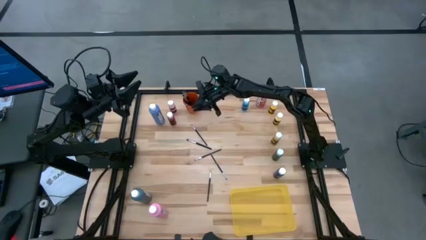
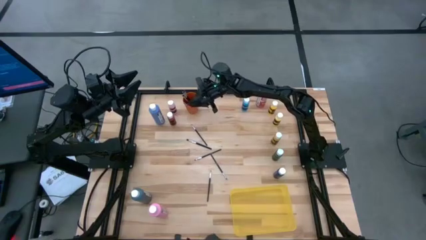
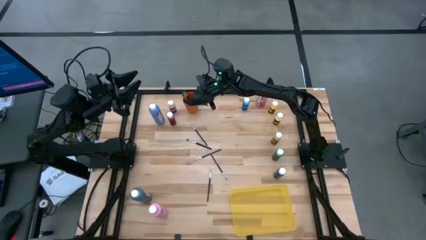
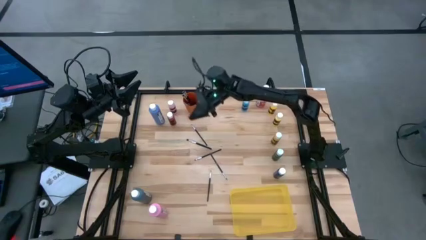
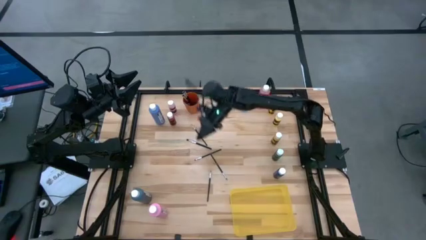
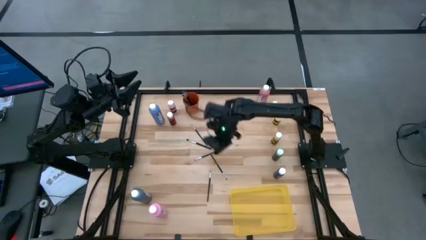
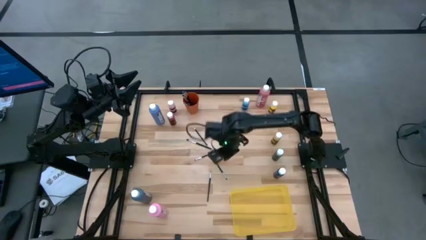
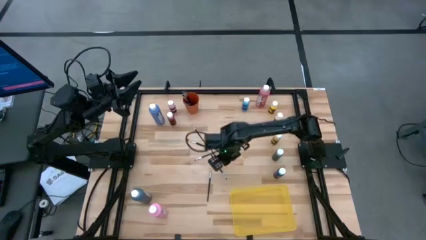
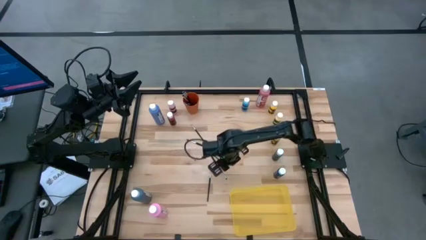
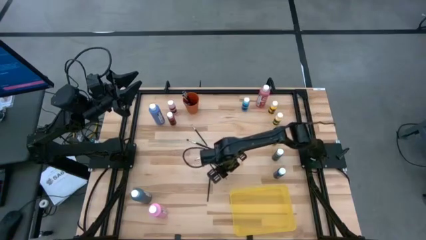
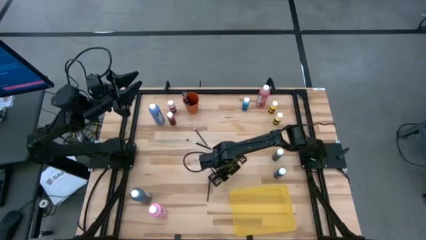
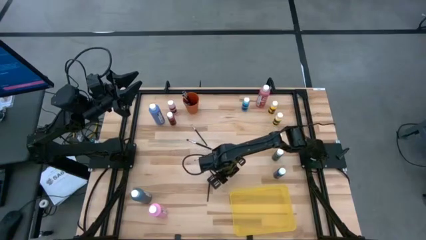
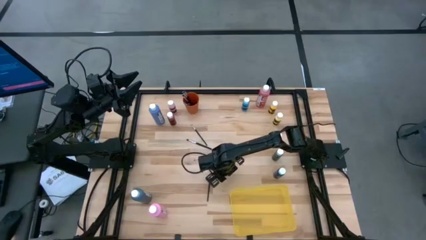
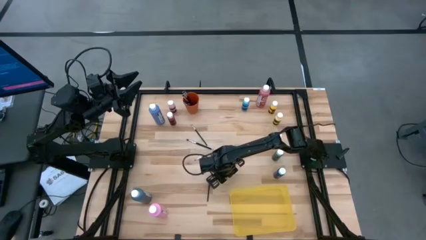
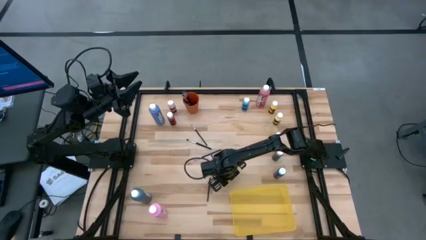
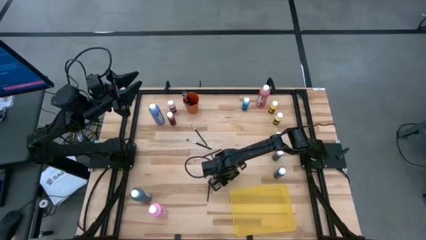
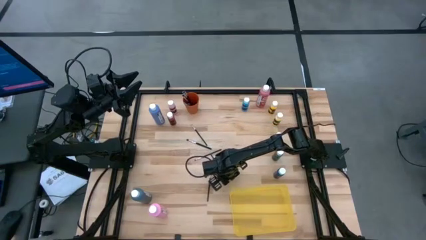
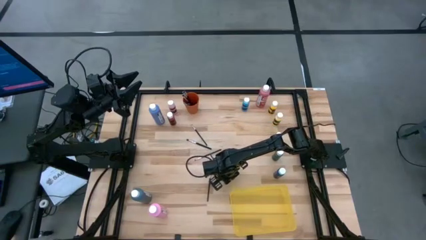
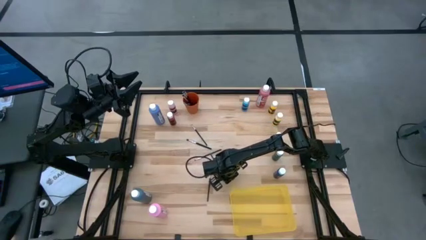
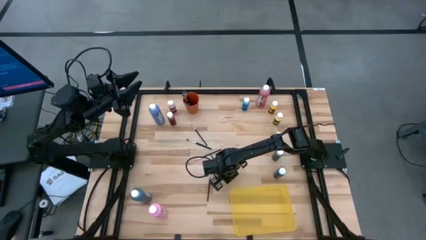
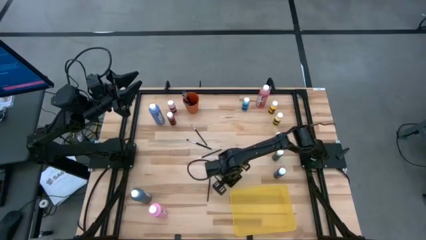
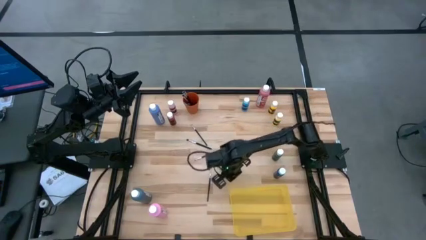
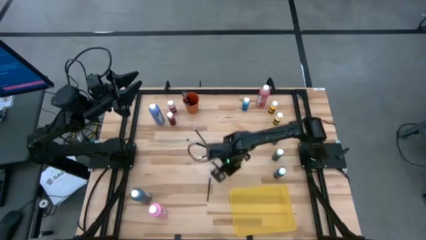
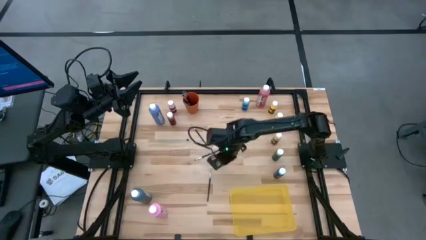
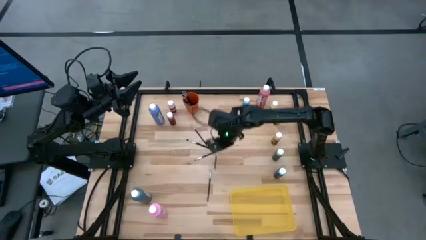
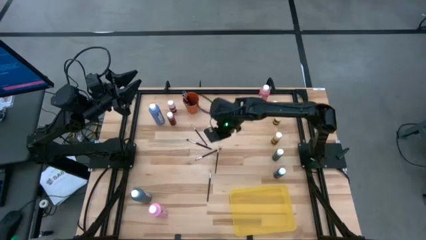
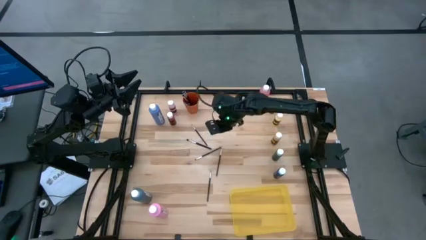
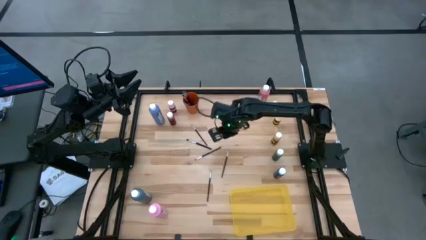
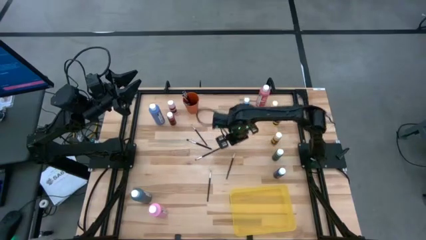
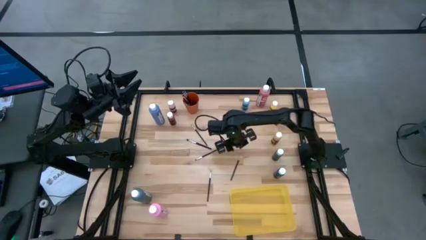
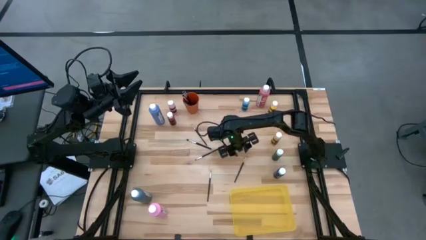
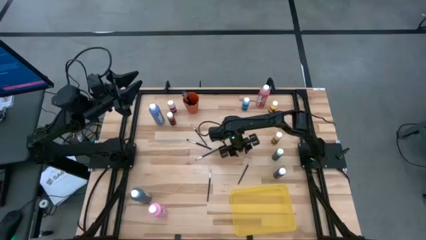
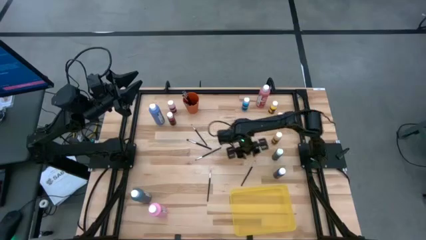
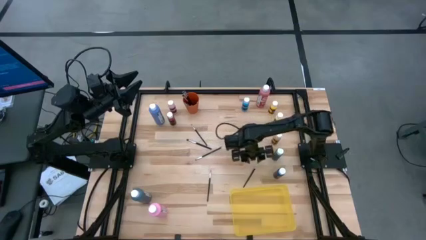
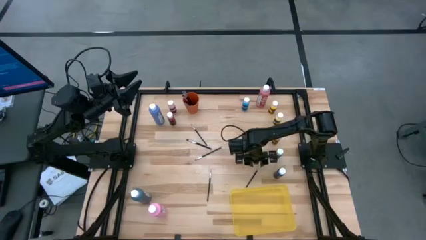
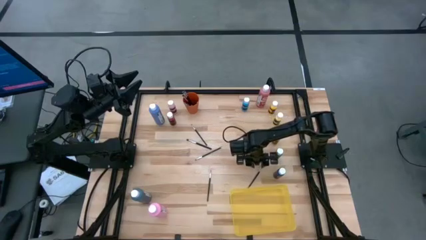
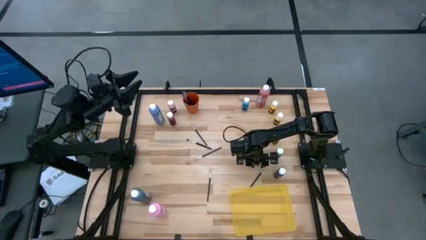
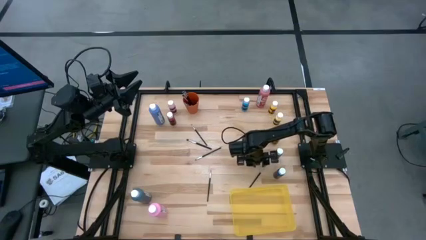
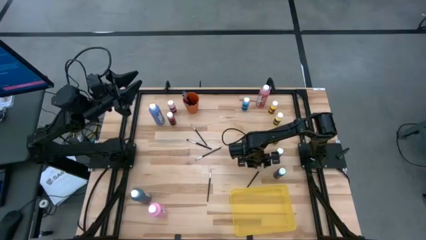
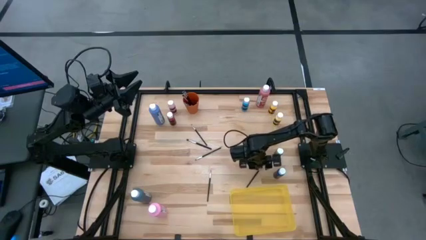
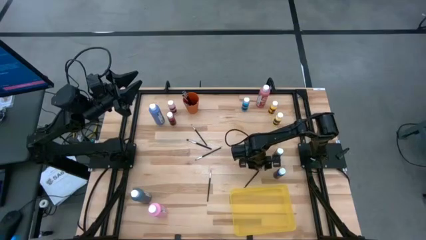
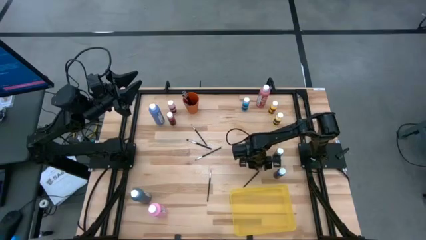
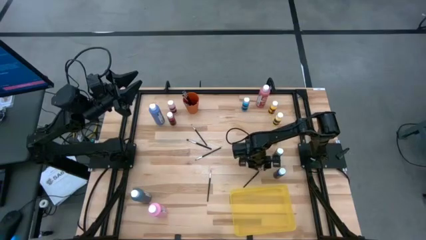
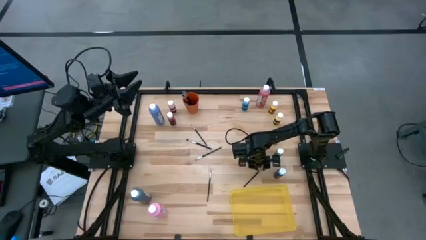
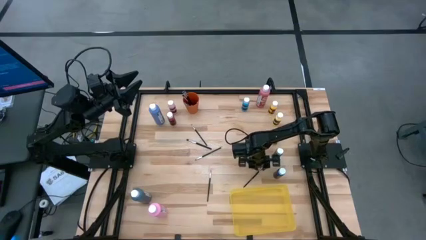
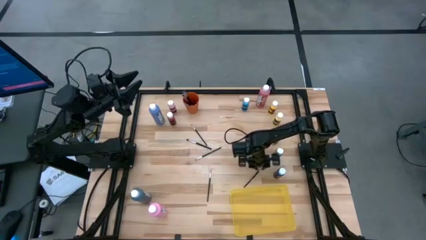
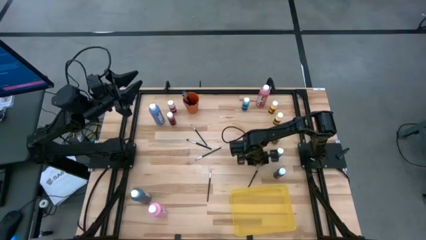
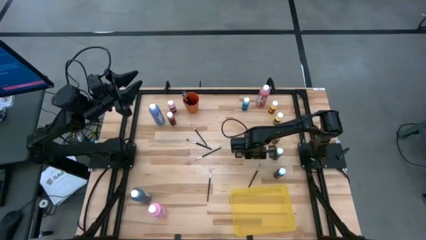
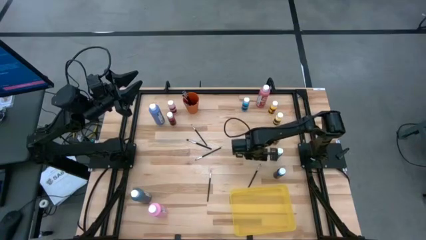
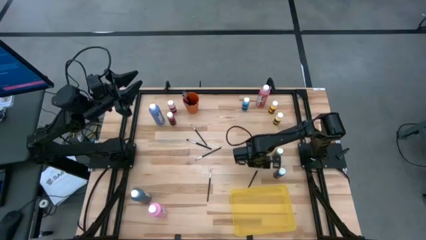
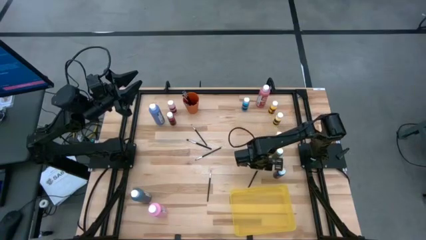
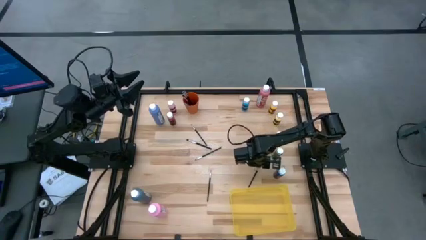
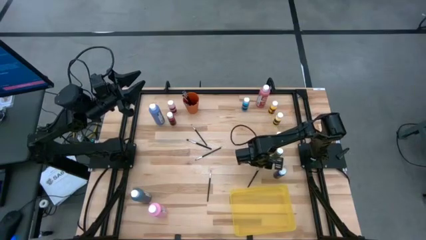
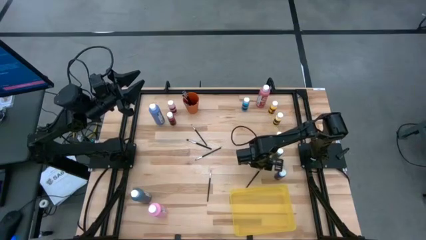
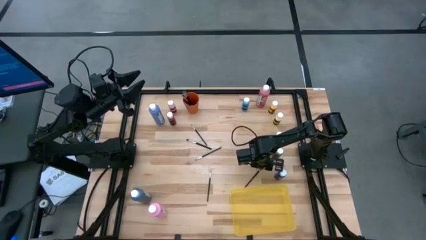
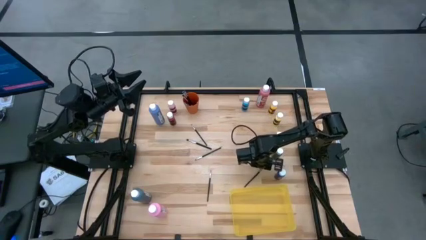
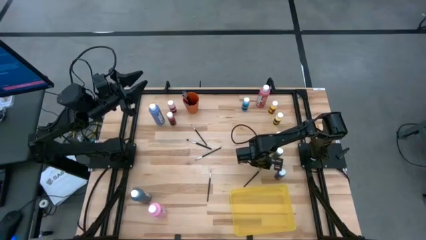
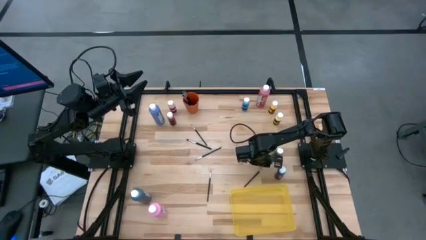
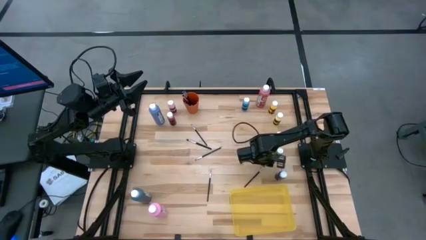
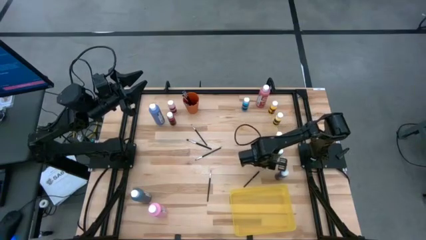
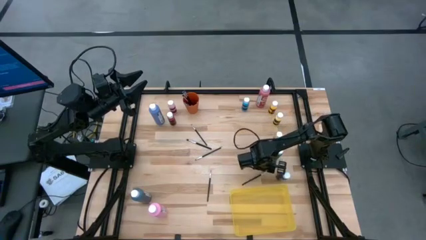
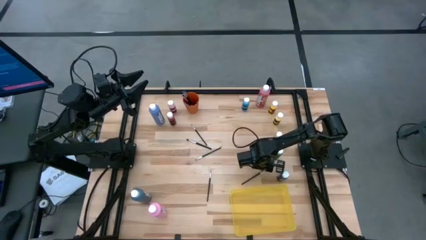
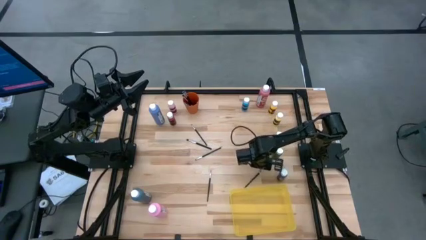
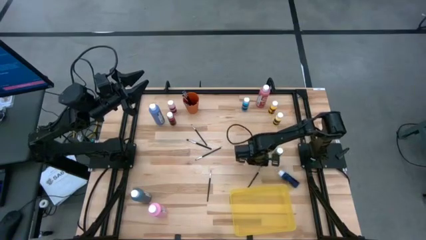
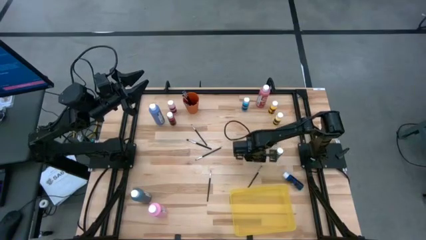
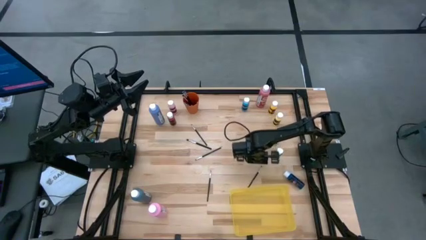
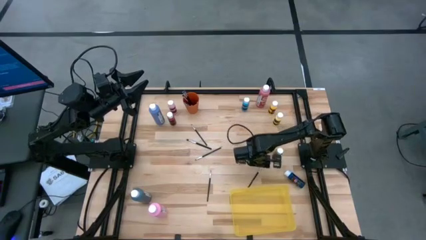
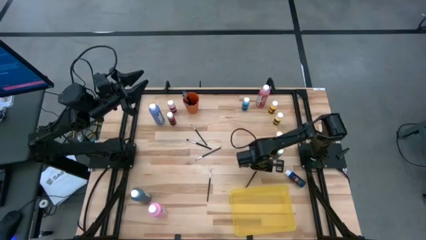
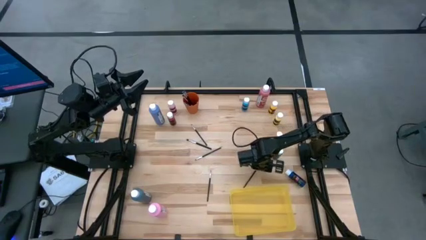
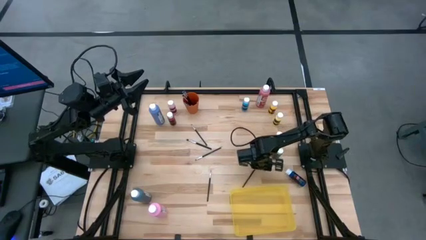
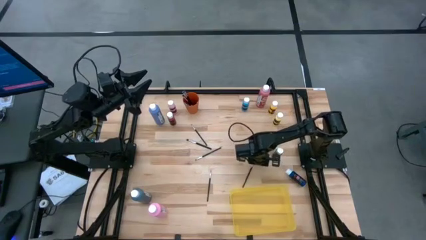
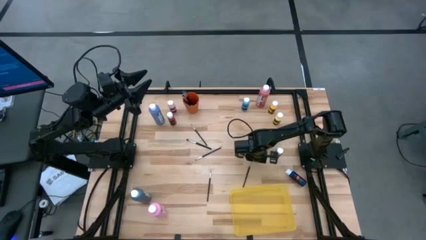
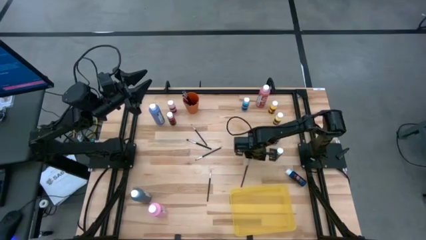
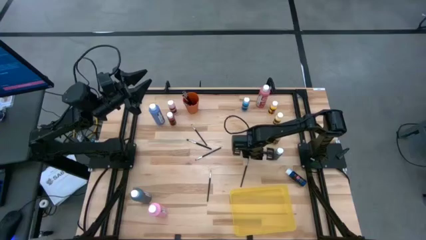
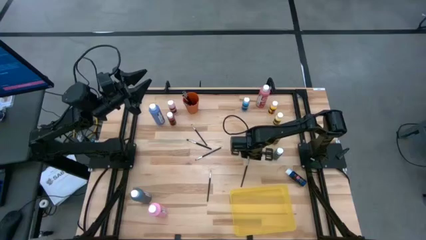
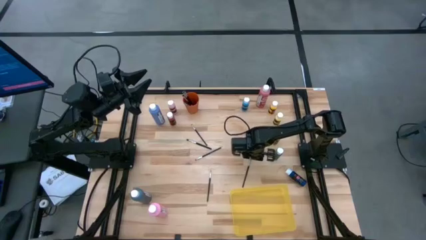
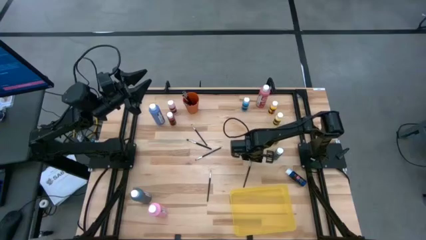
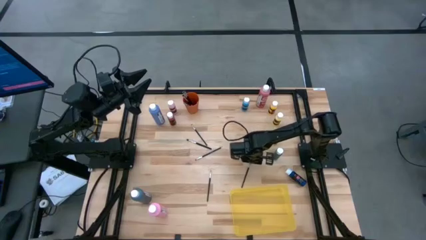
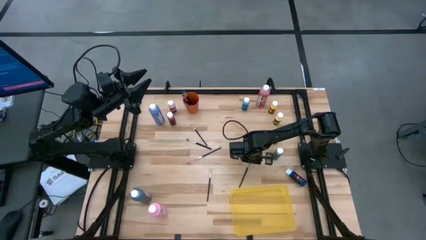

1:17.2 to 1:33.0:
Task: Pick & Place Paint Supplies
Put the black paint brush into the orange cup

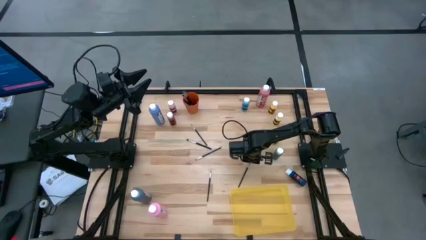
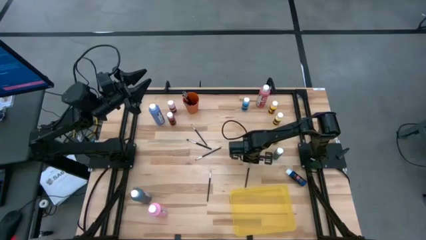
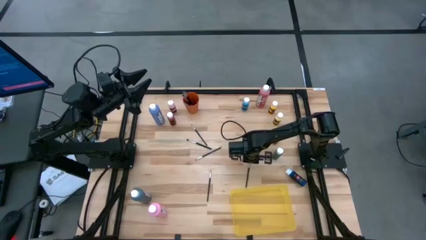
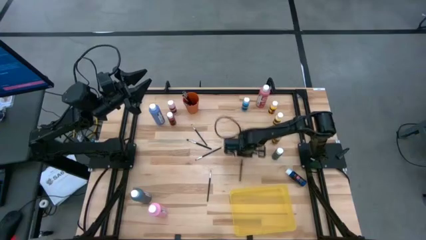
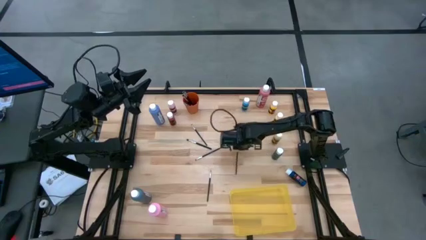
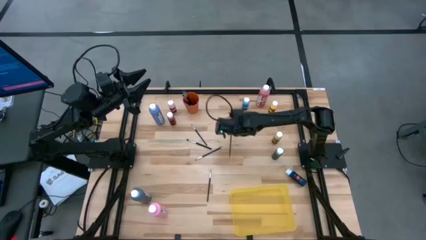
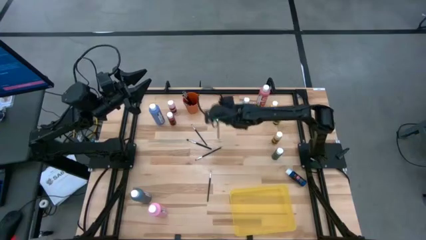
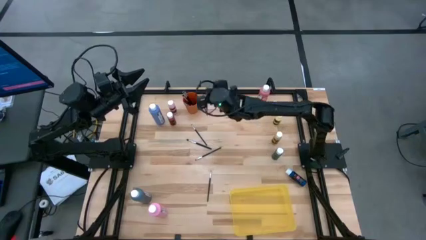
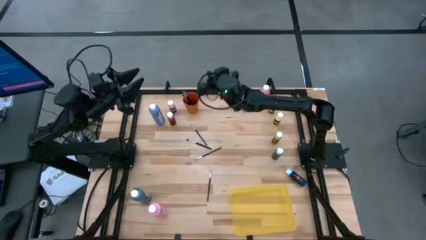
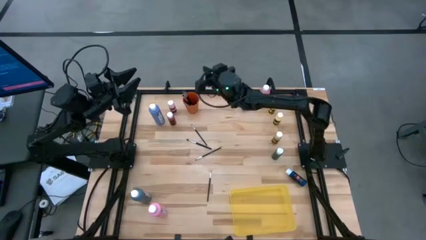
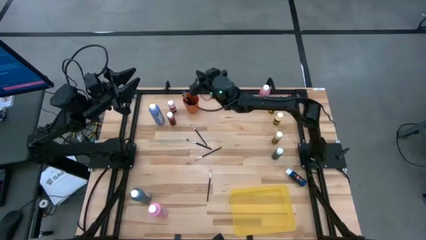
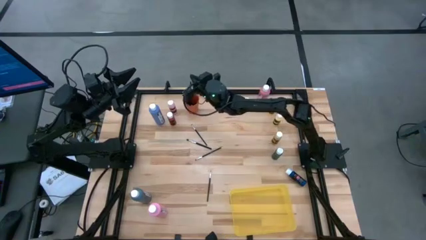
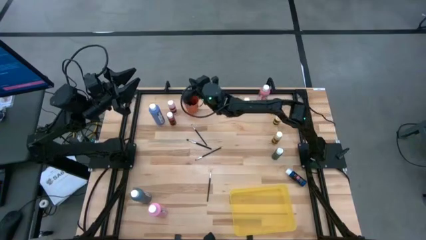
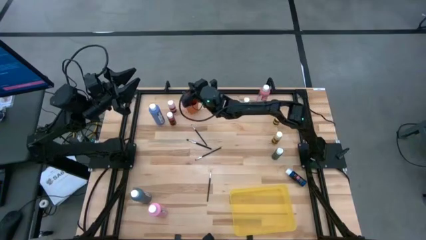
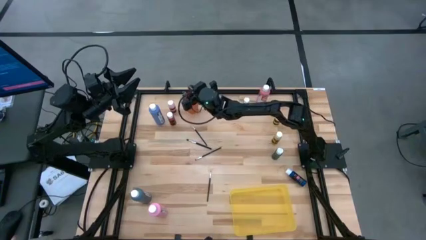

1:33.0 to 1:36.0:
Put the black paint brush into the orange cup
